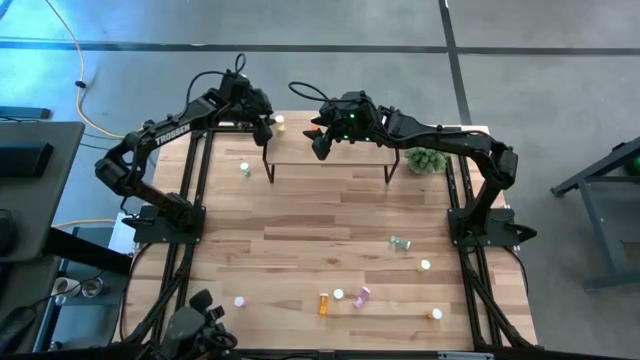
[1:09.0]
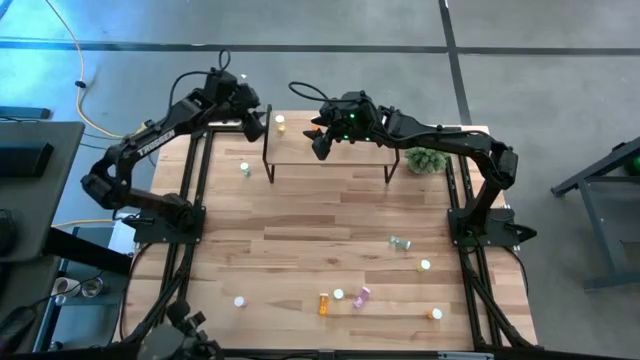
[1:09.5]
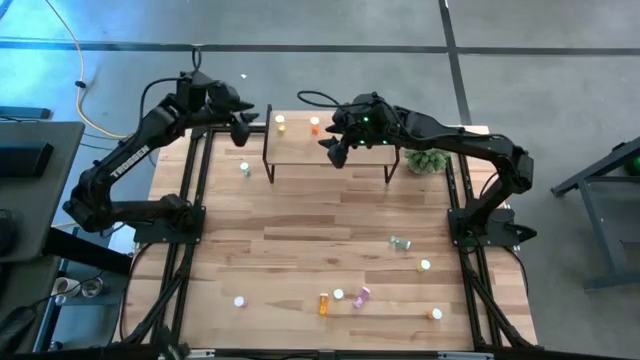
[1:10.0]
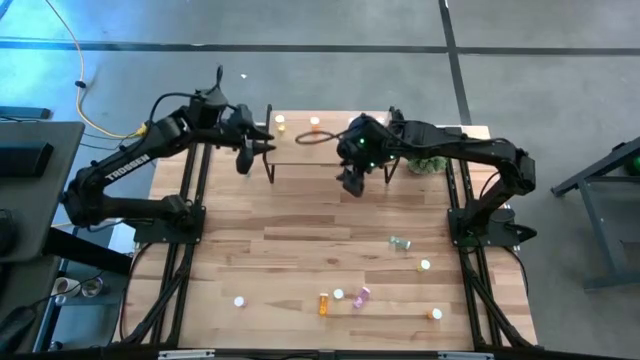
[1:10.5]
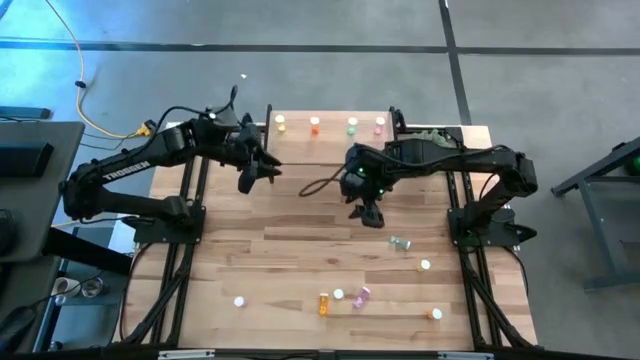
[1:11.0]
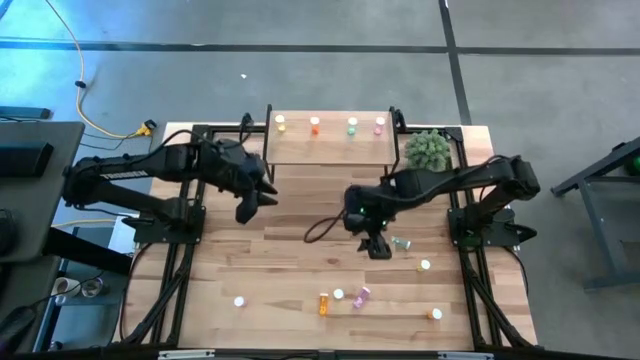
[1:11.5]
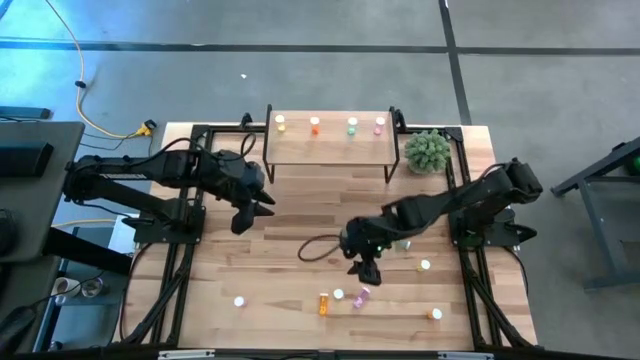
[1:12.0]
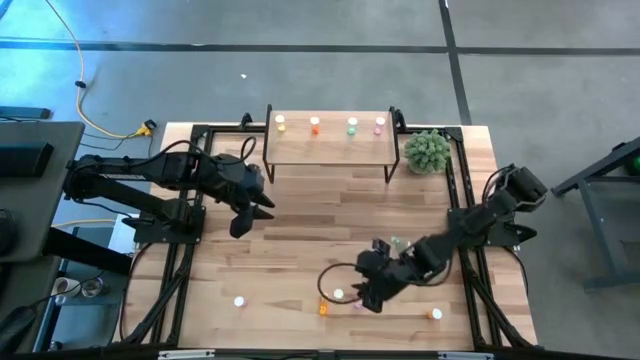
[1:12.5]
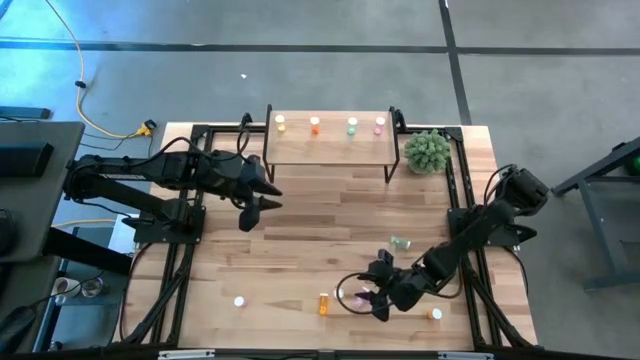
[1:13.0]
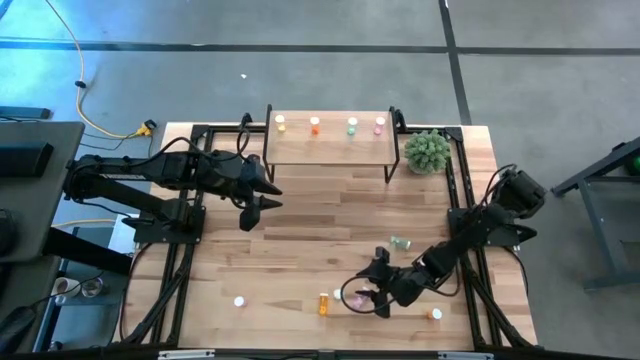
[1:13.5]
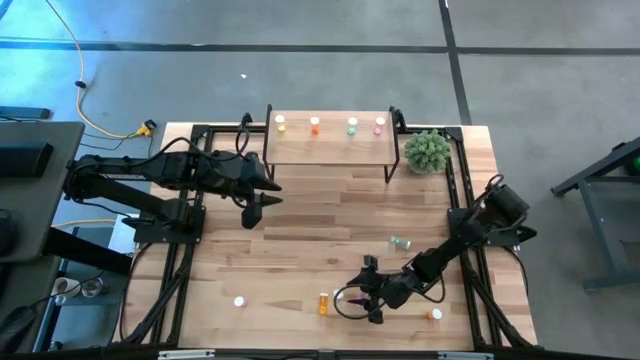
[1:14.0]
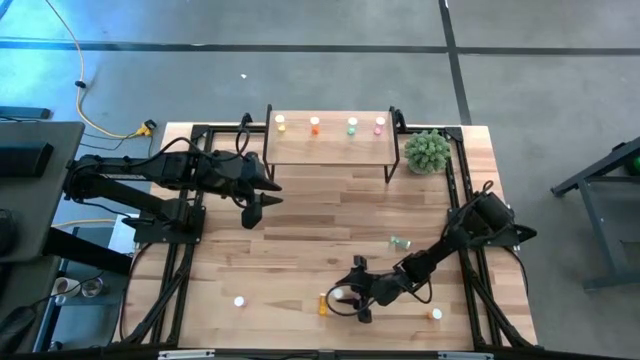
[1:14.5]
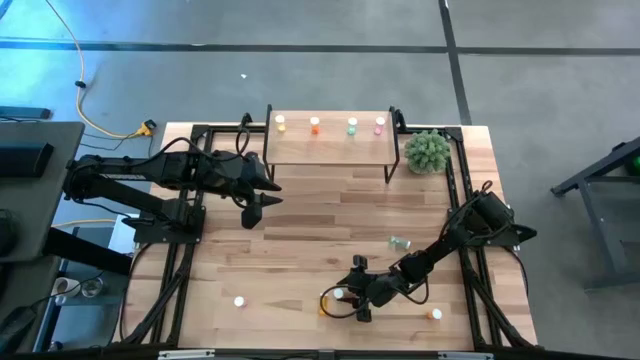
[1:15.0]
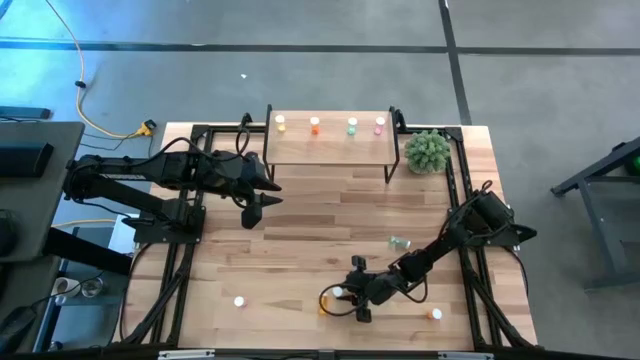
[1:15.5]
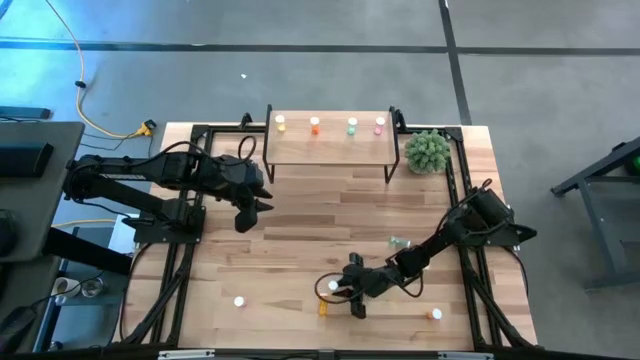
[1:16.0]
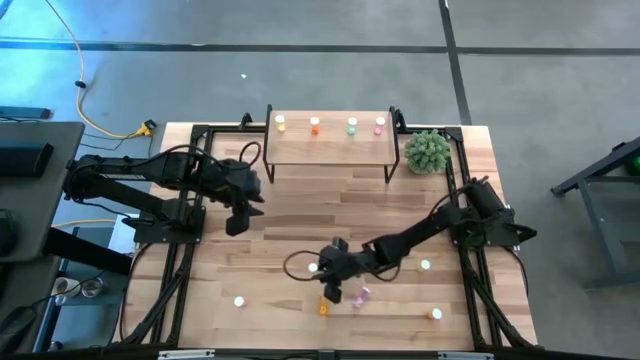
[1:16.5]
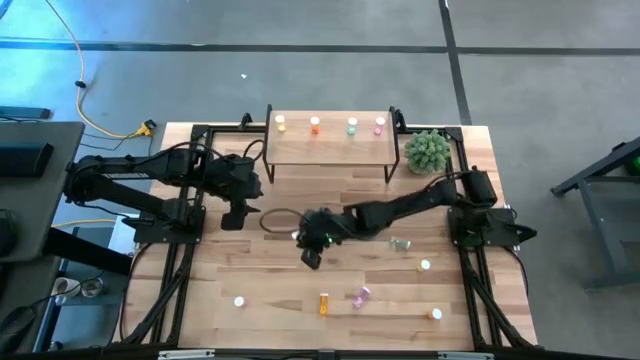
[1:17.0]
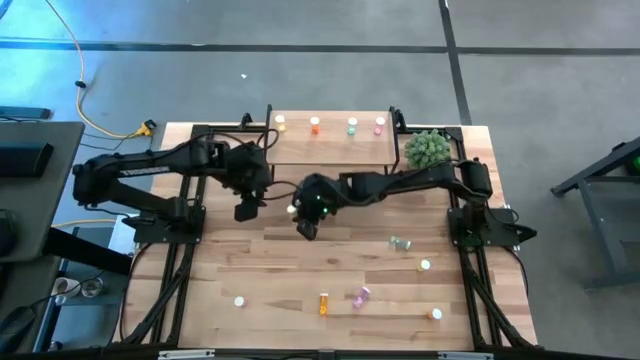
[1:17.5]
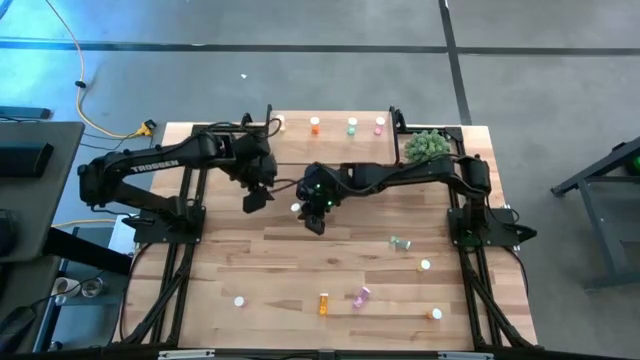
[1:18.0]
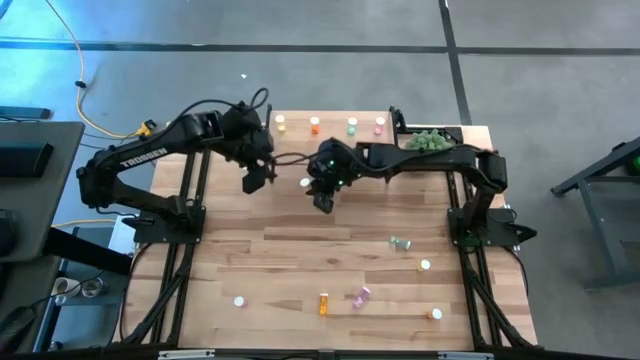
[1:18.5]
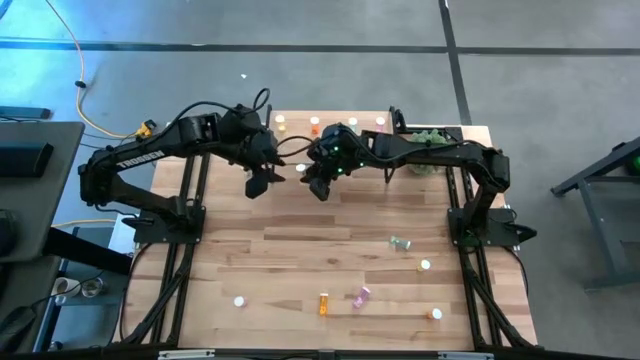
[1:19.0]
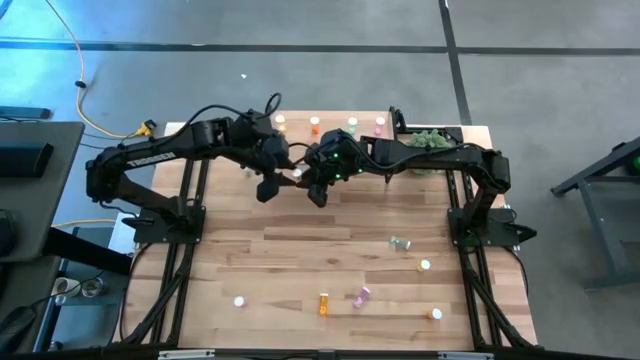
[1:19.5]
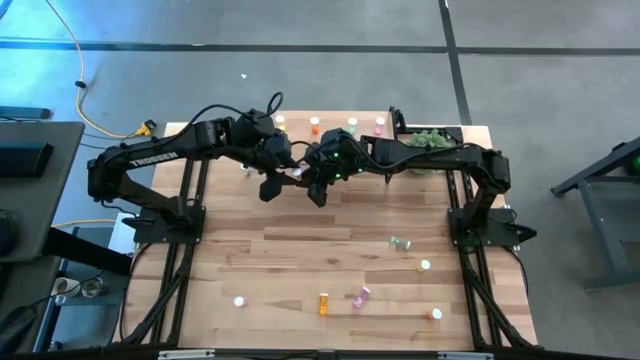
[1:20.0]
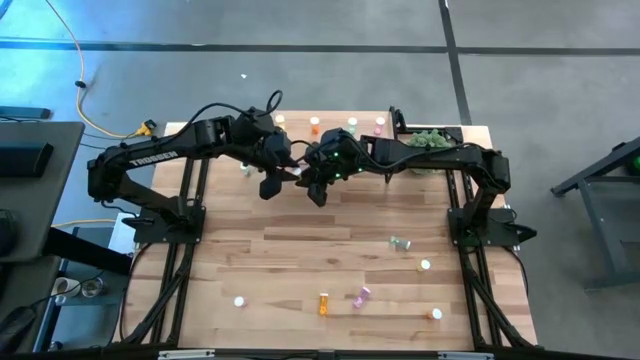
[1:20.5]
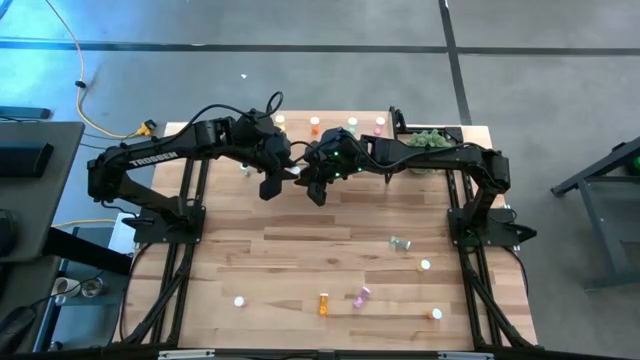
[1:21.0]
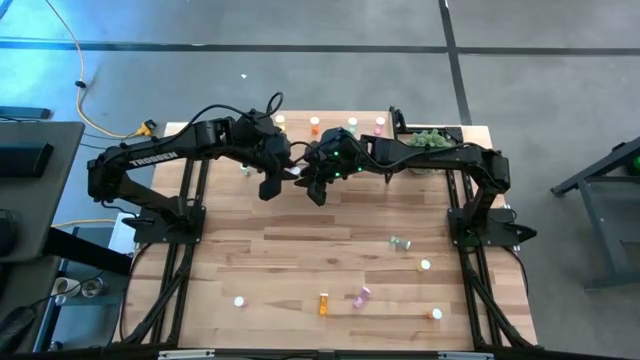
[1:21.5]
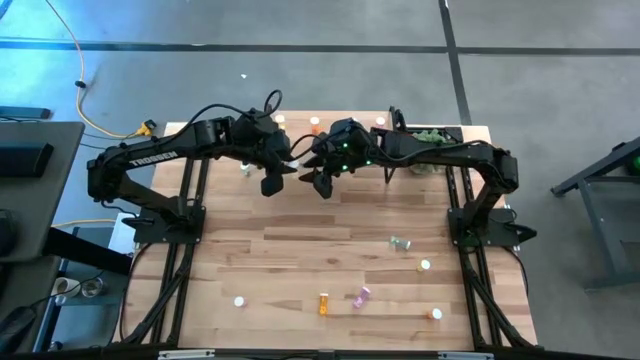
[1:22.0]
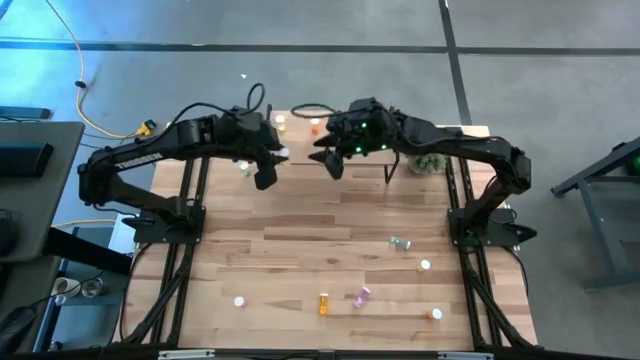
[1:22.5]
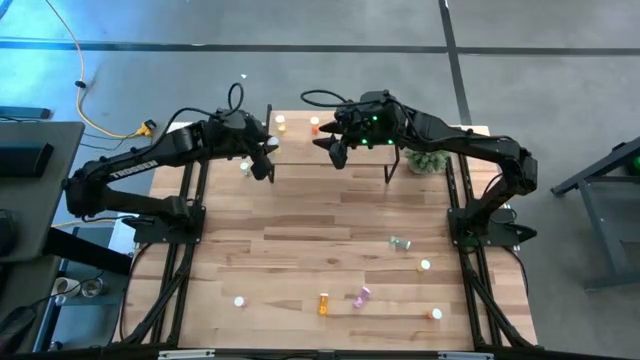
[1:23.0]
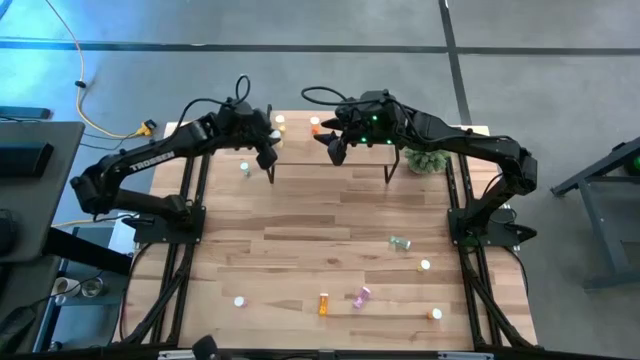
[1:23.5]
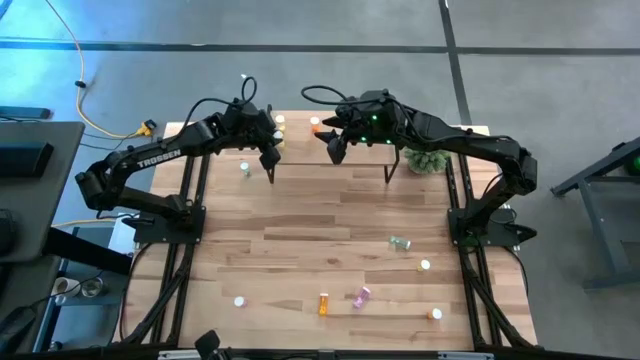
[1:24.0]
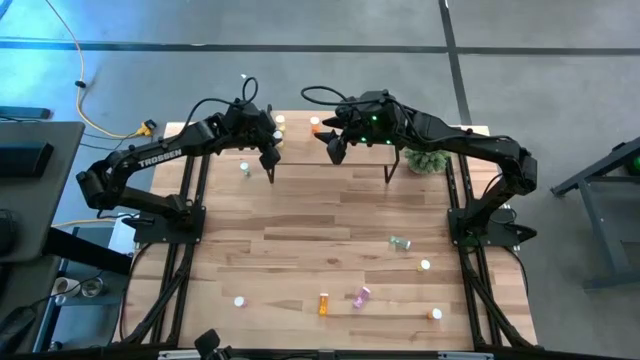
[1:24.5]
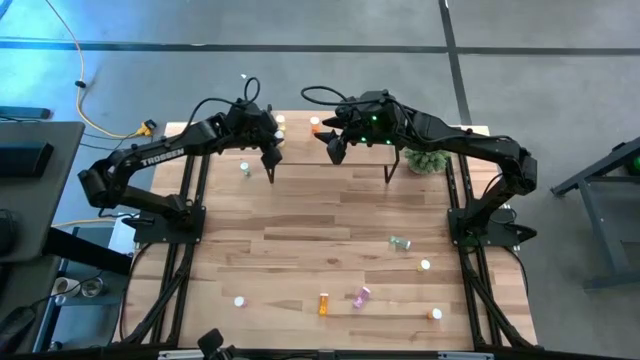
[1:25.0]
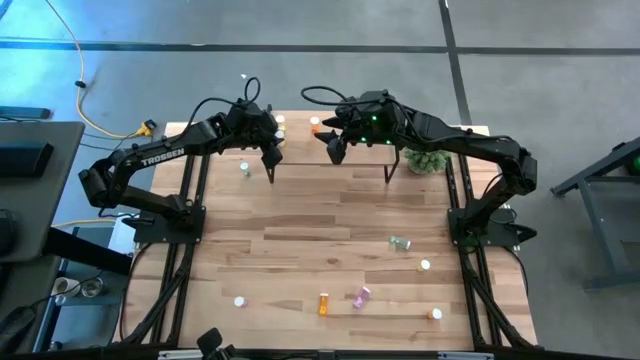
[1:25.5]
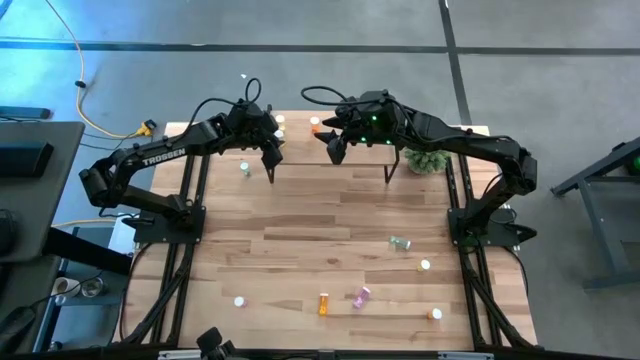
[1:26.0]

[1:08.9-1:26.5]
Task: Pick and place medicine bottles onto shelf by color
Put the bottom yellow pill bottle on the shelf aligned with the the other yellow pill bottle

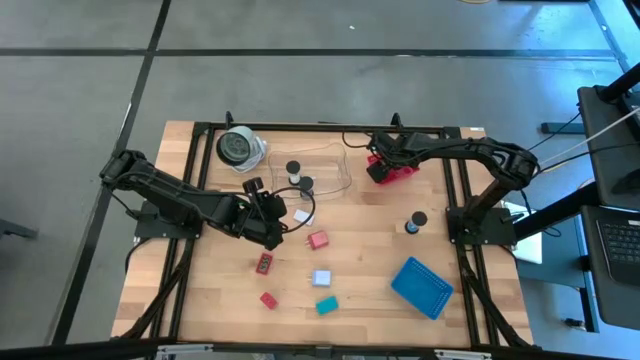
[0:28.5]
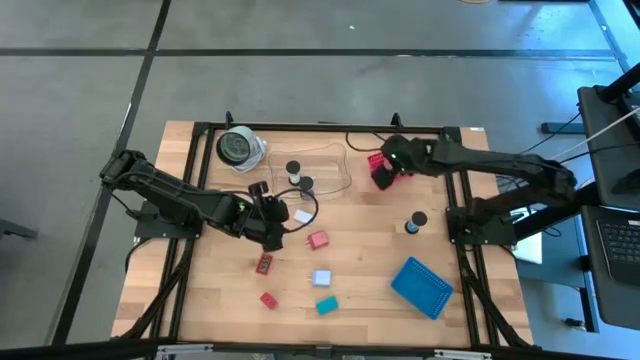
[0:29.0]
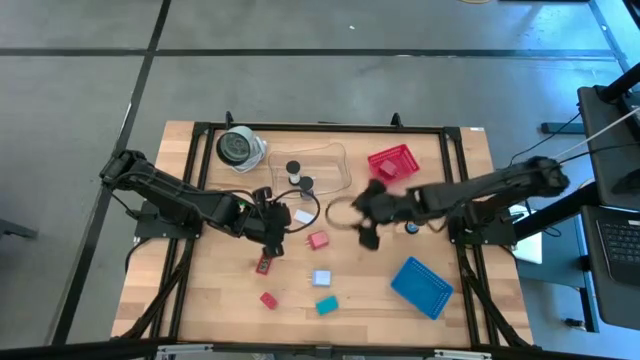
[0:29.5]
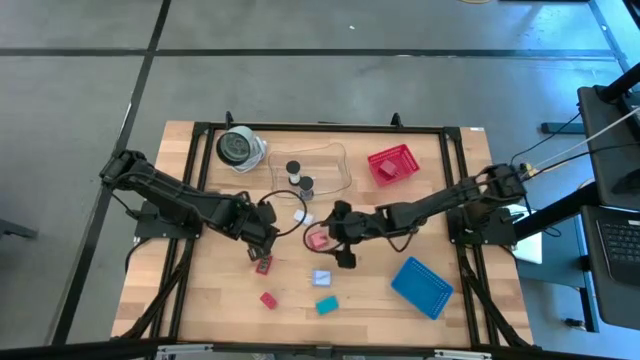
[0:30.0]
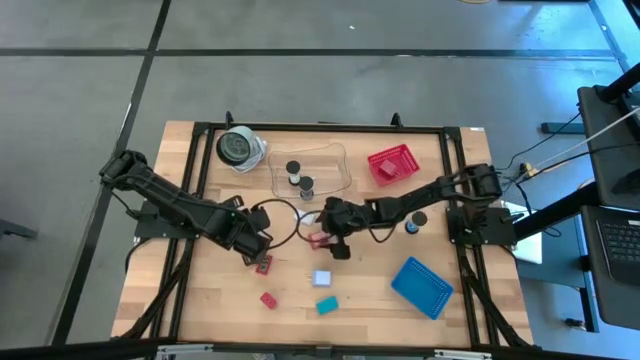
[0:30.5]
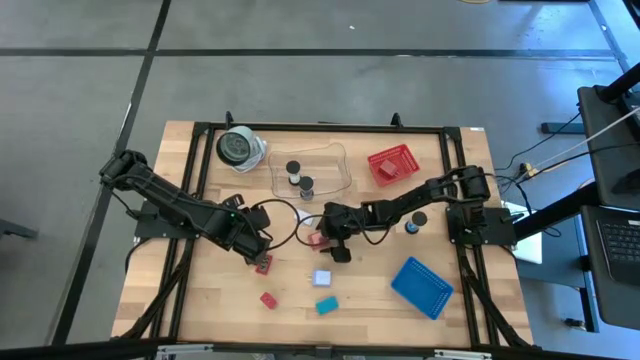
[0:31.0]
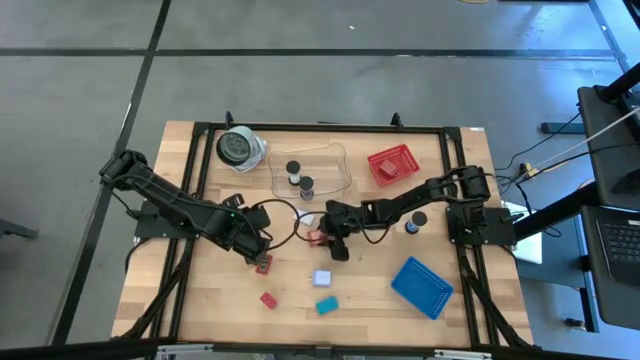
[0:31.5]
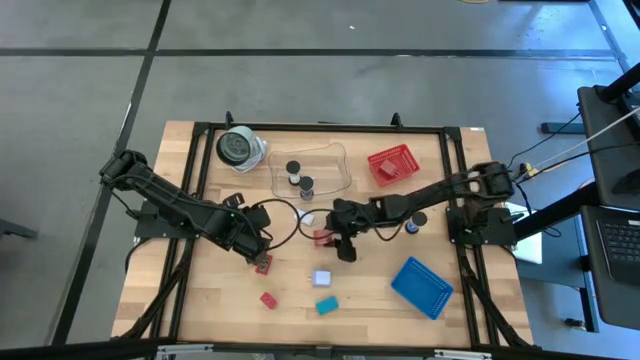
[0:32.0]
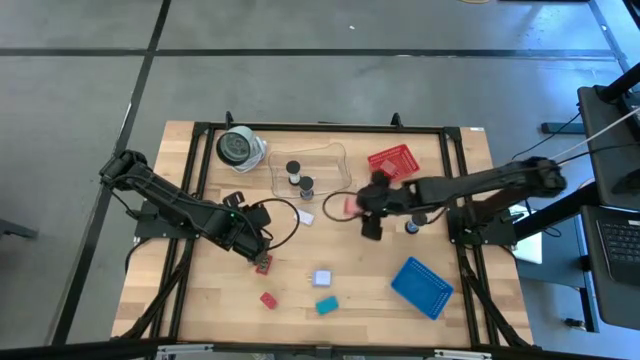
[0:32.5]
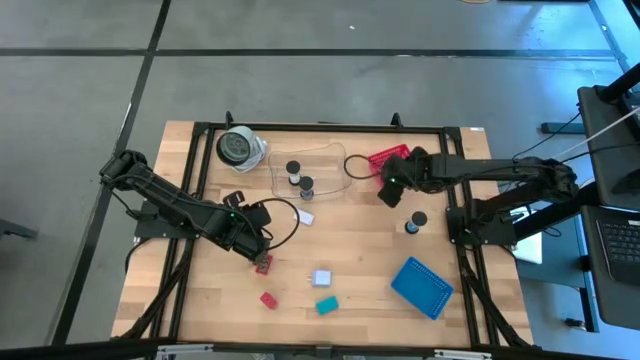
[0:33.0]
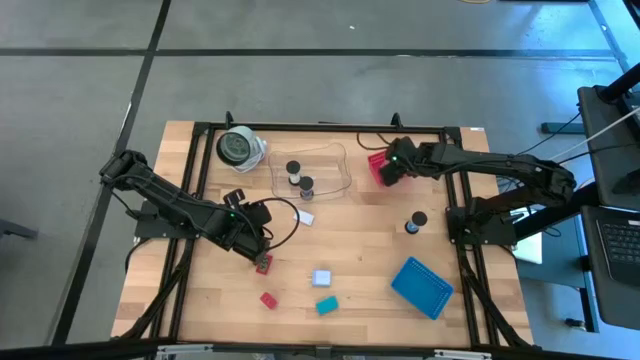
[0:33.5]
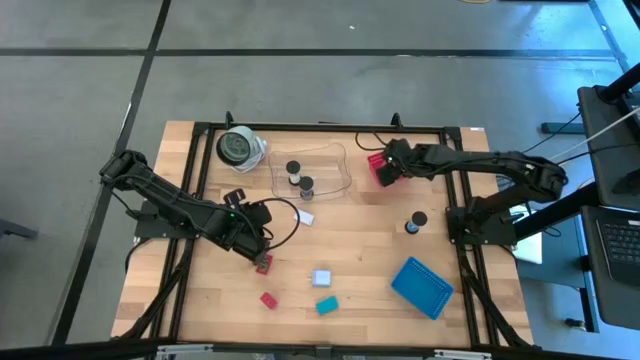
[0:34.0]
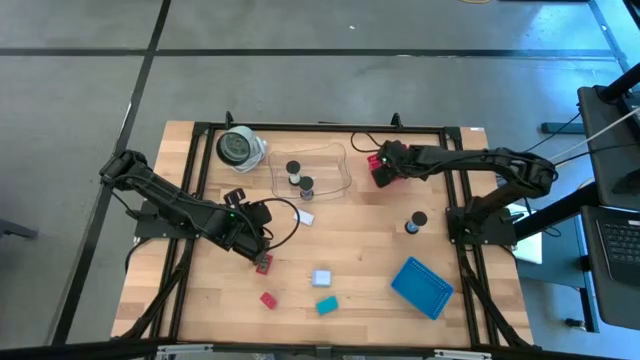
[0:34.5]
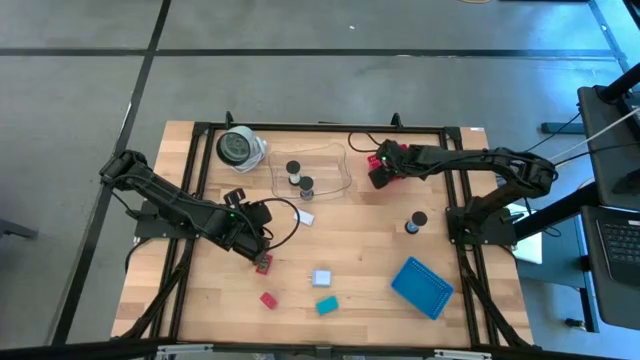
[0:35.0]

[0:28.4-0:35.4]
Task: Pick & Place Office items
Put the top red charger adapter into the red bin
